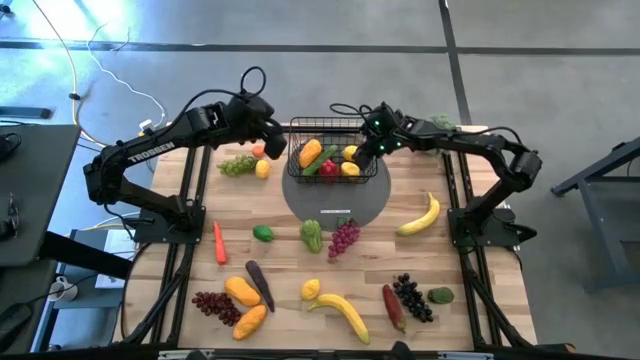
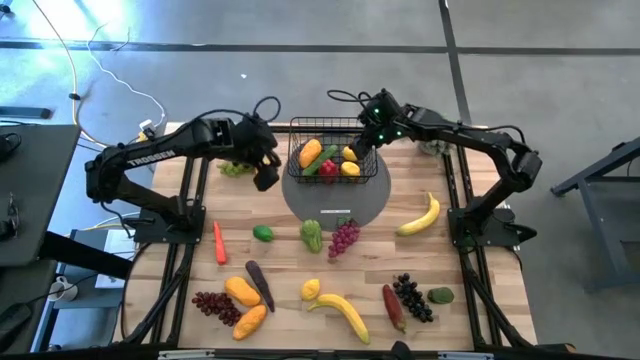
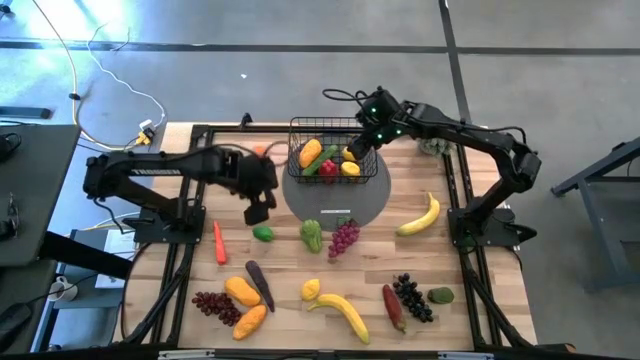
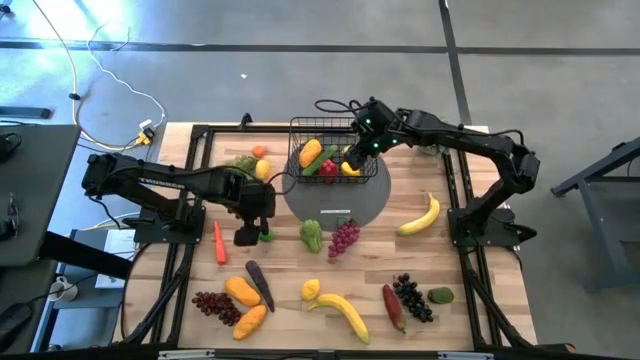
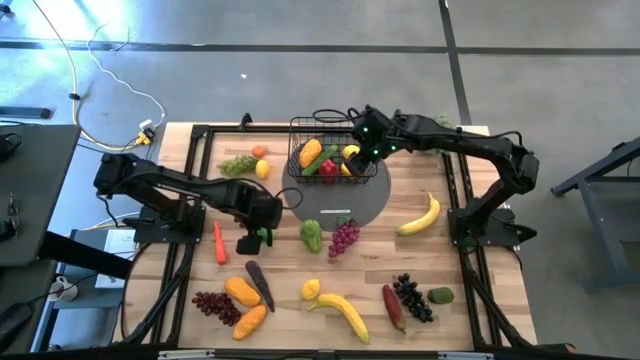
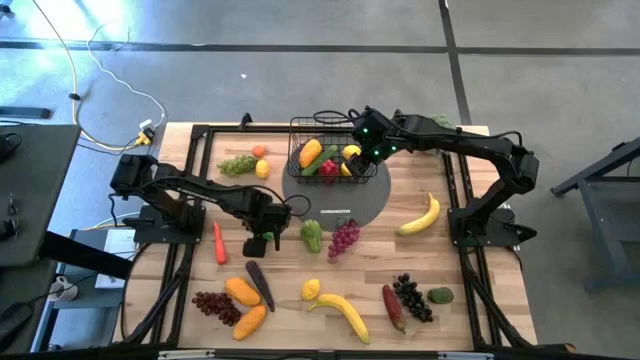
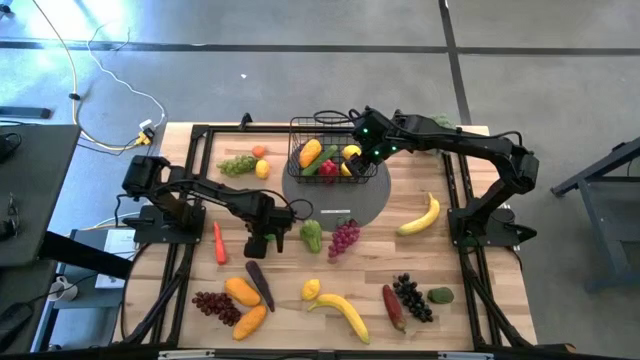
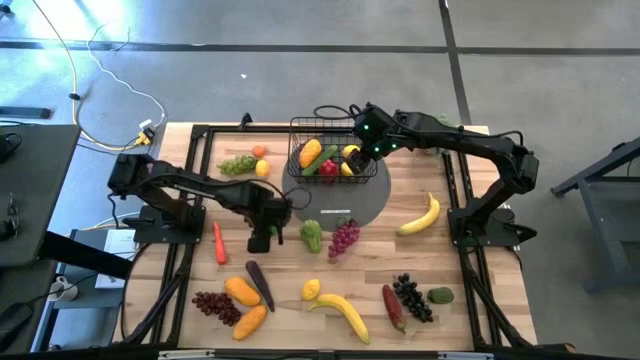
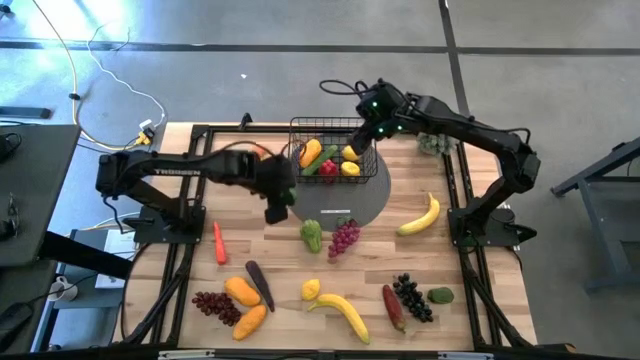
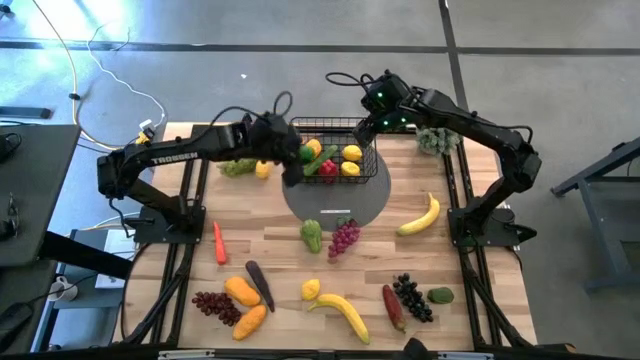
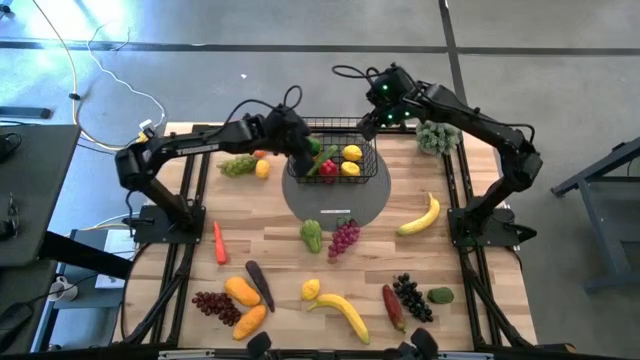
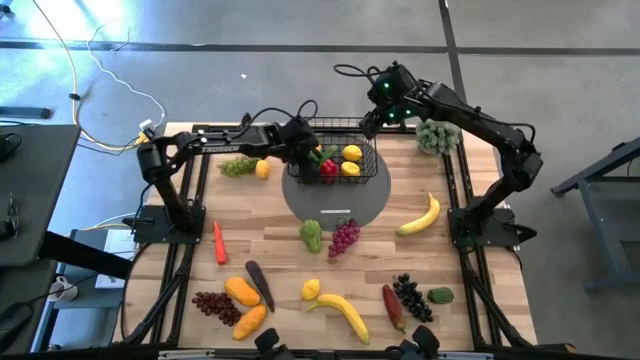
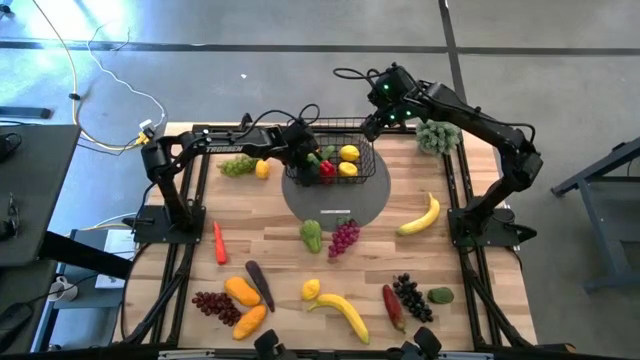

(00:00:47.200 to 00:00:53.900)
Task: Build produce basket
Put the green lime into the wire basket

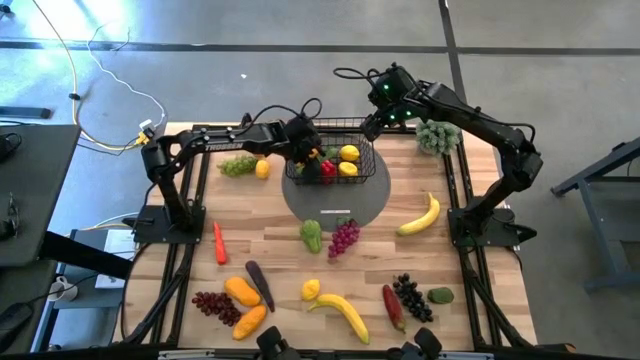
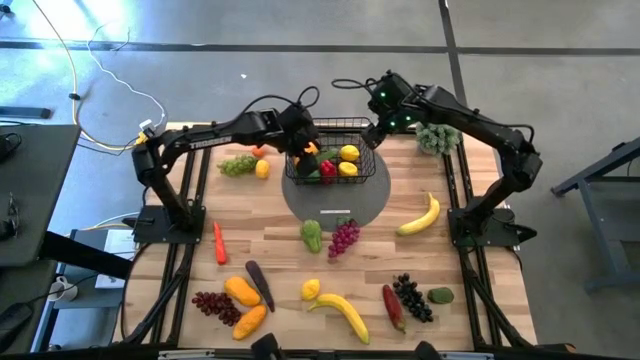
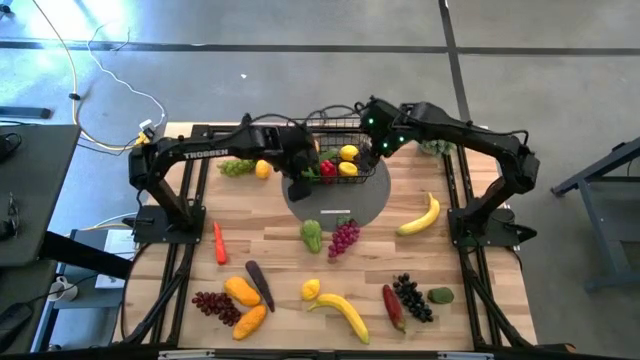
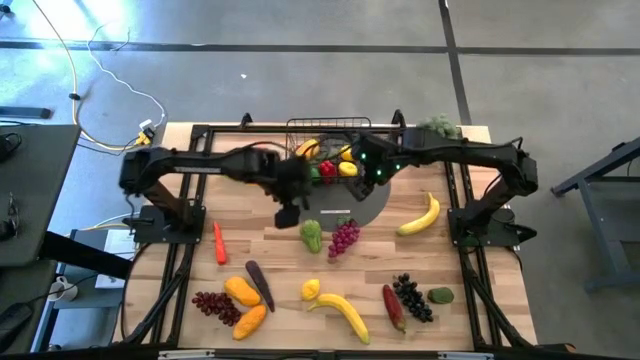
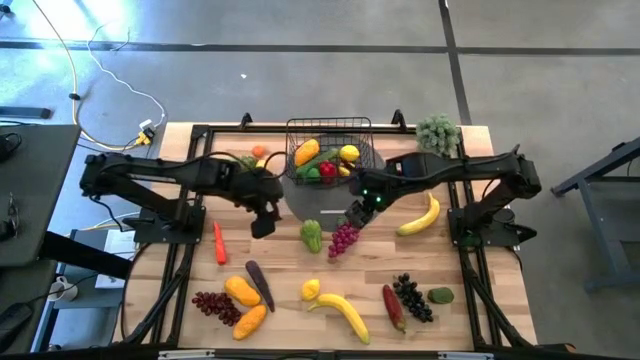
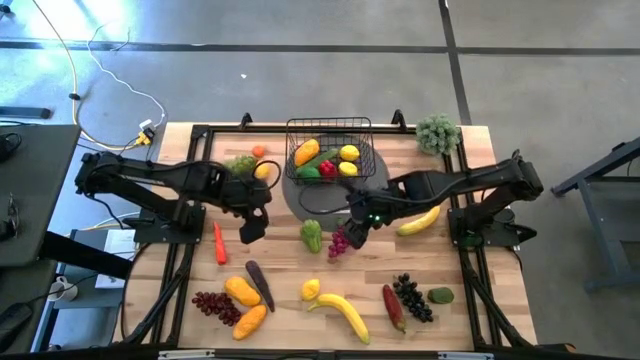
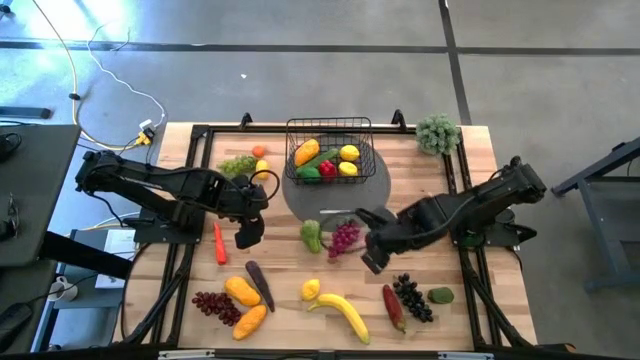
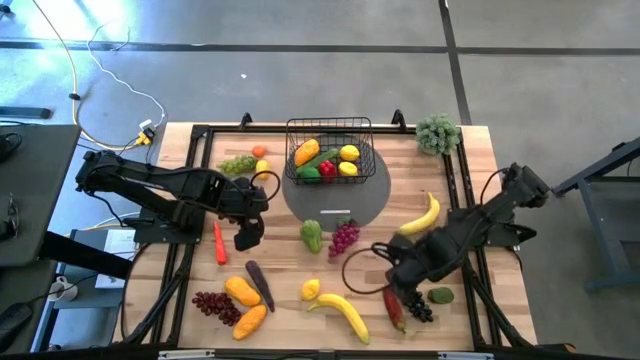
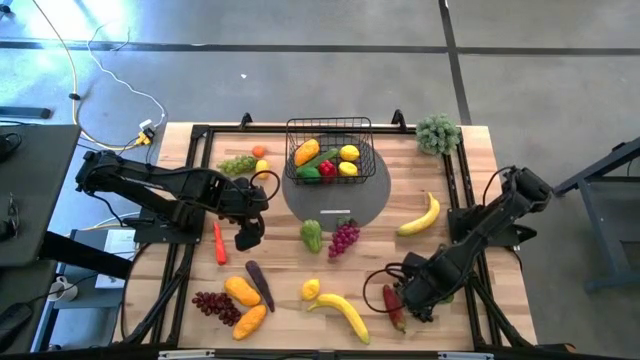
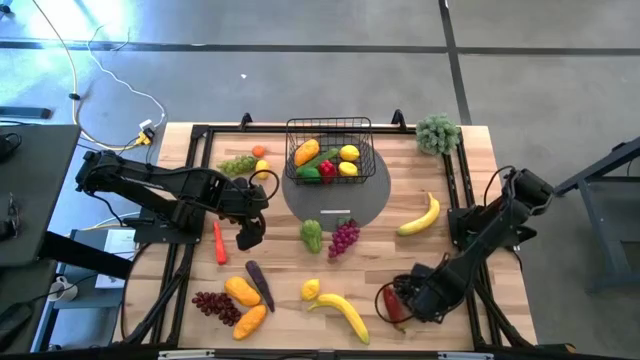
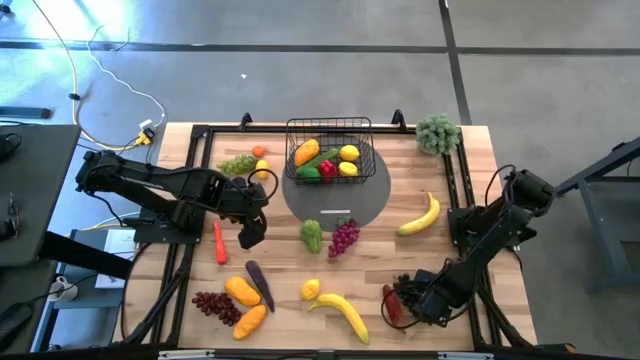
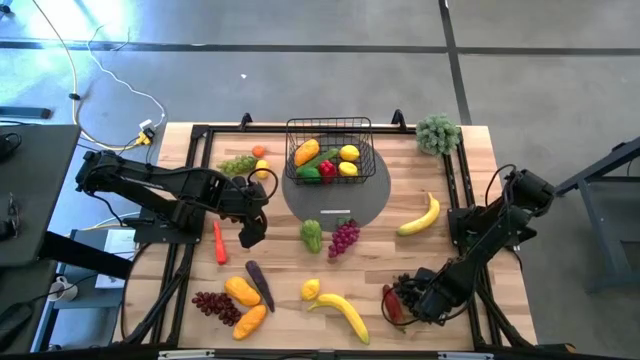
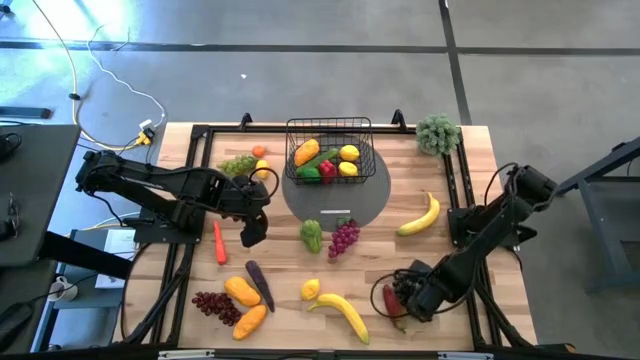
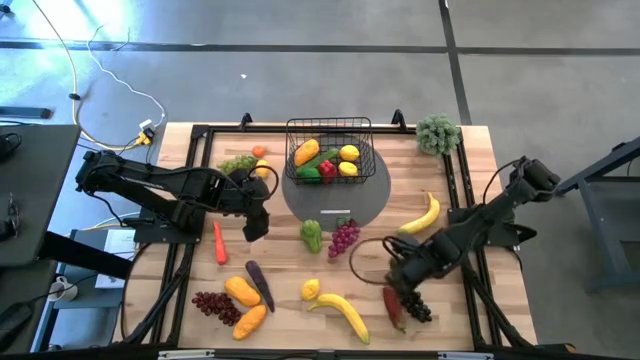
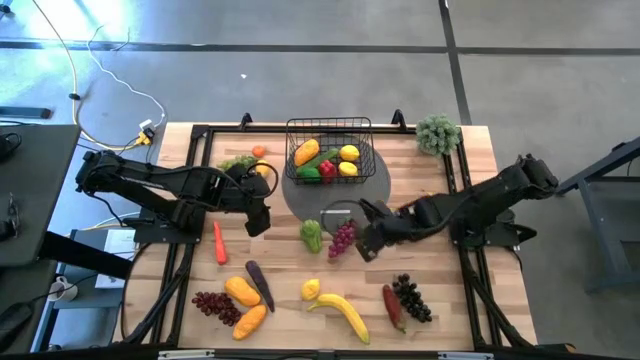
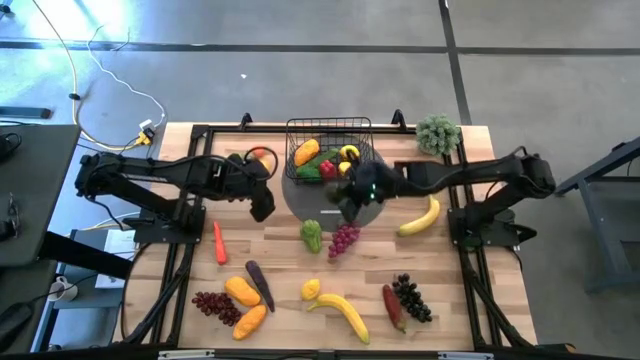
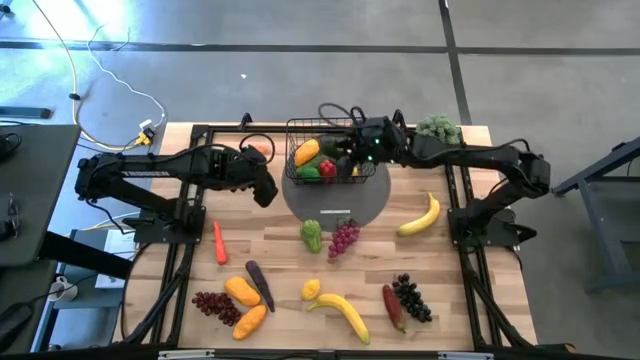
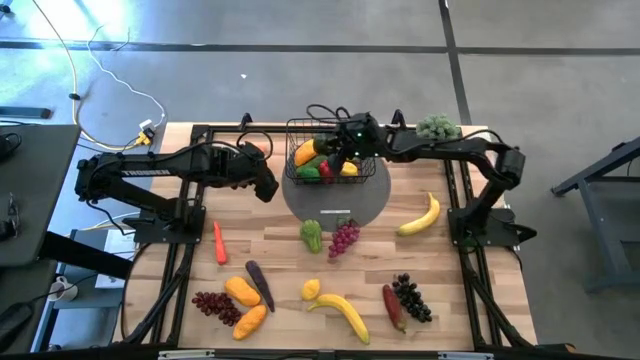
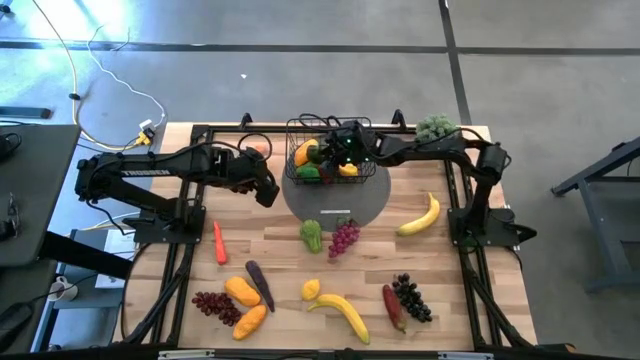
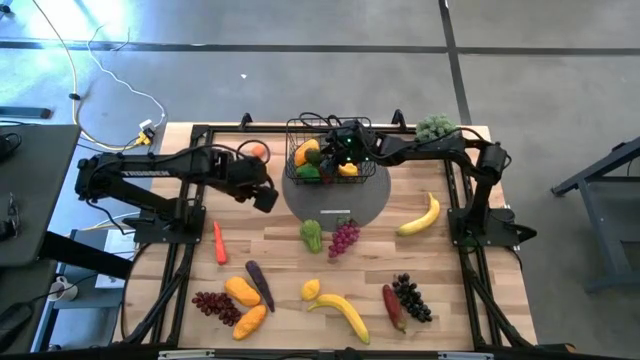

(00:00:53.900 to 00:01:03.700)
Put the green lime into the wire basket

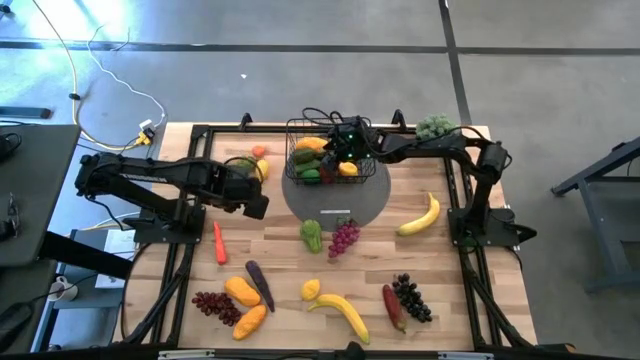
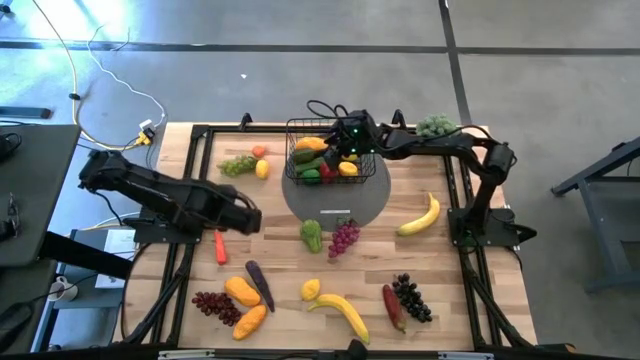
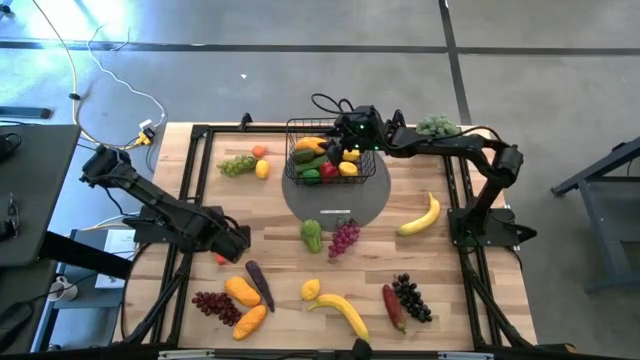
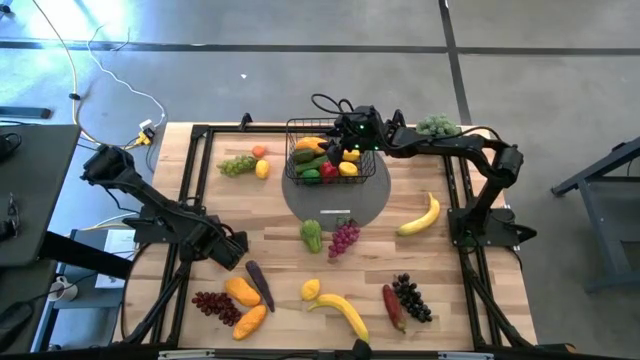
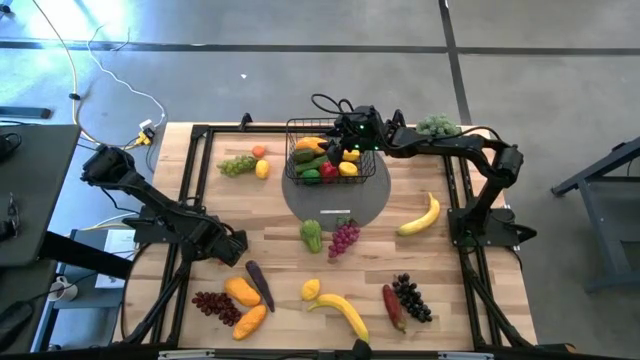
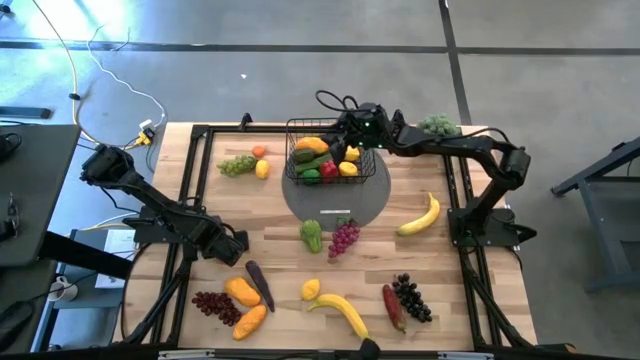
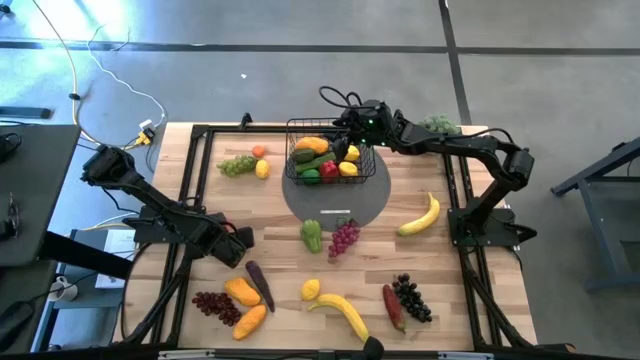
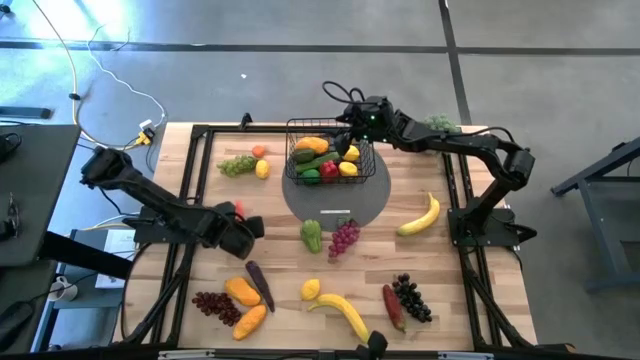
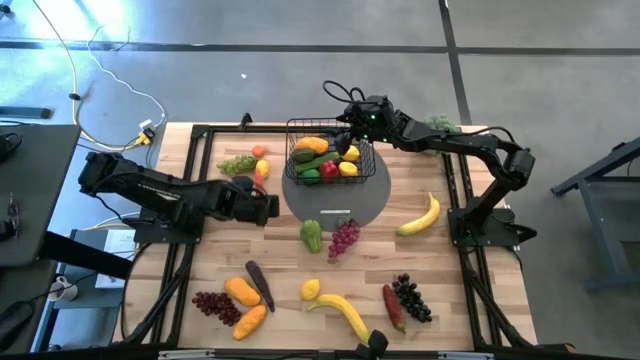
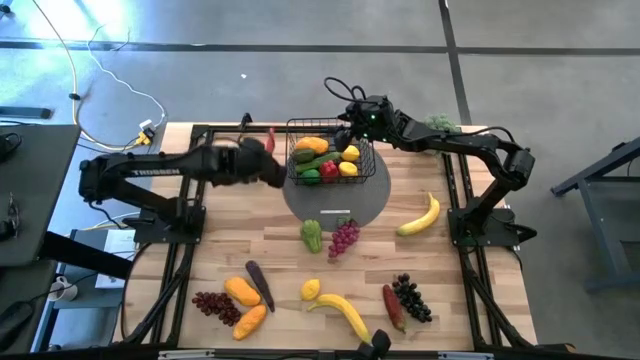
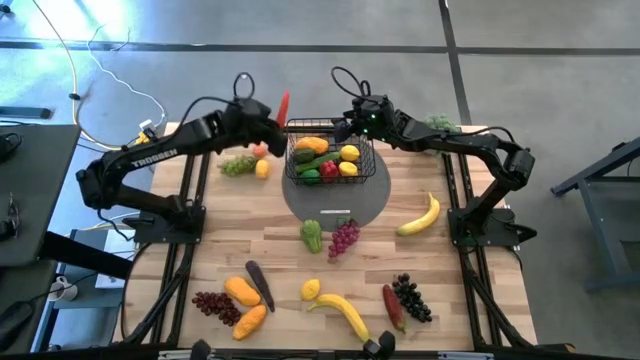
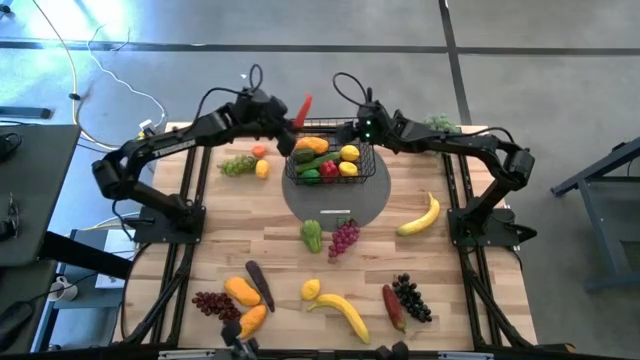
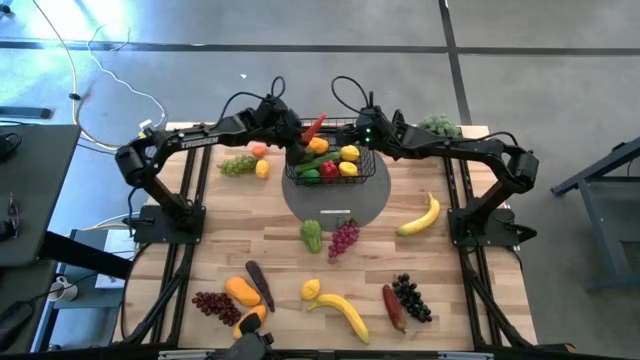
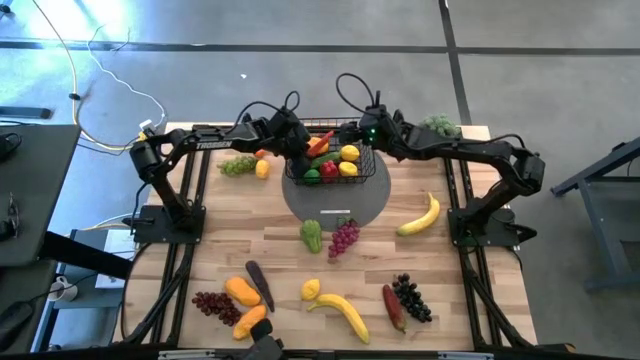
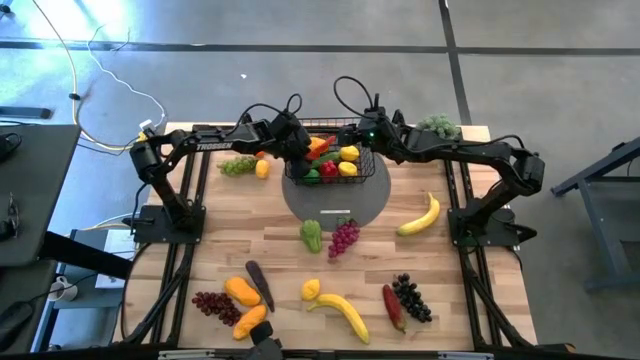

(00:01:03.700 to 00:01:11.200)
Put the orange carrot into the wire basket
